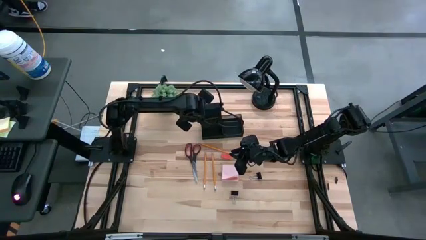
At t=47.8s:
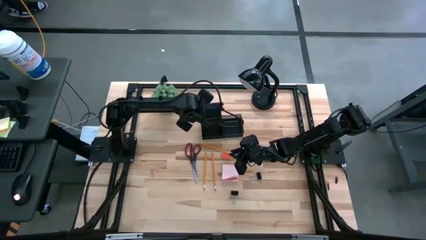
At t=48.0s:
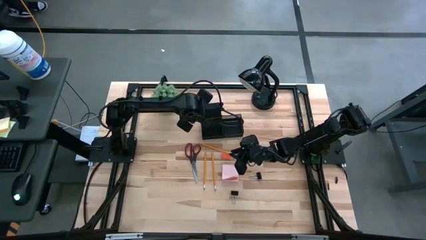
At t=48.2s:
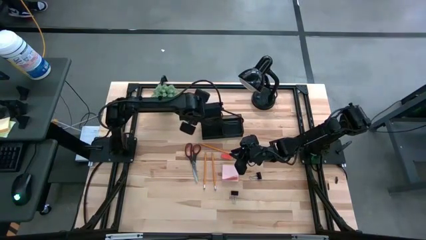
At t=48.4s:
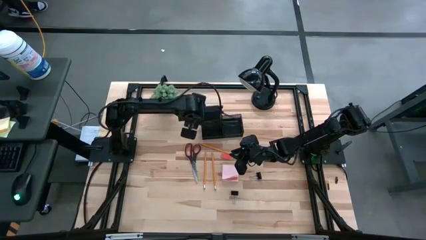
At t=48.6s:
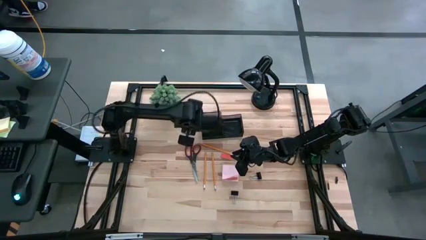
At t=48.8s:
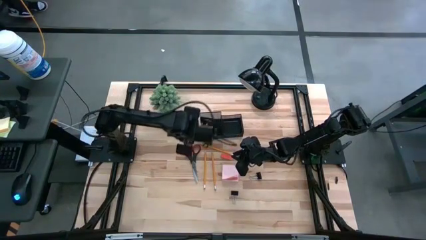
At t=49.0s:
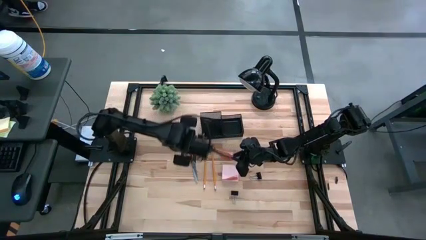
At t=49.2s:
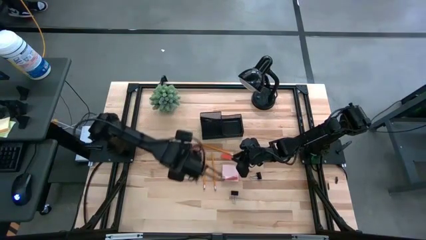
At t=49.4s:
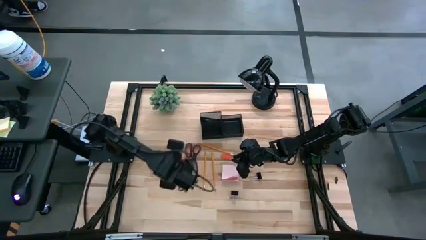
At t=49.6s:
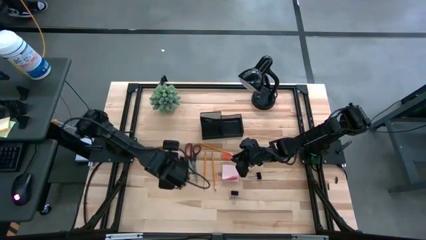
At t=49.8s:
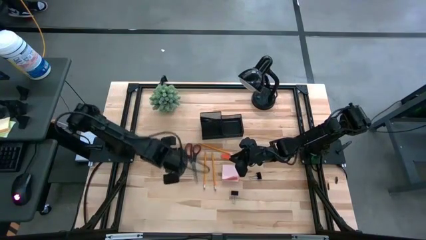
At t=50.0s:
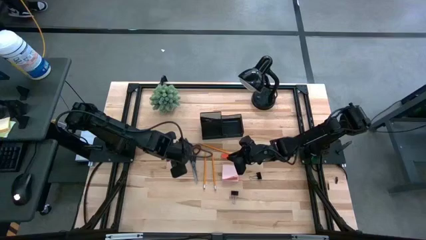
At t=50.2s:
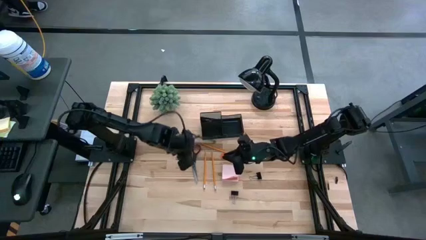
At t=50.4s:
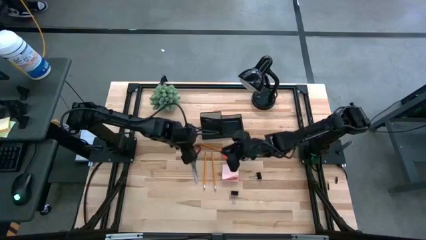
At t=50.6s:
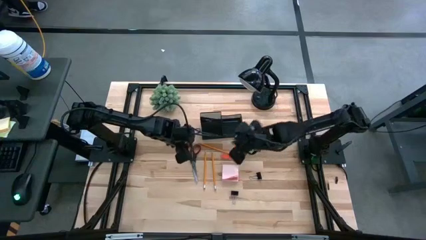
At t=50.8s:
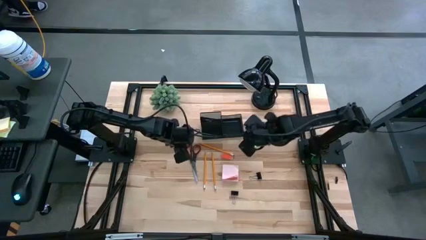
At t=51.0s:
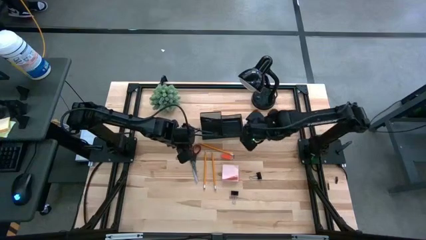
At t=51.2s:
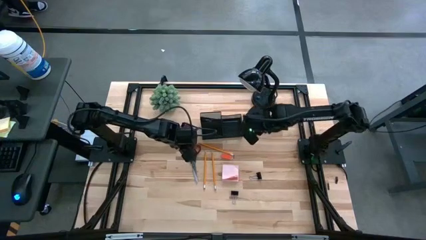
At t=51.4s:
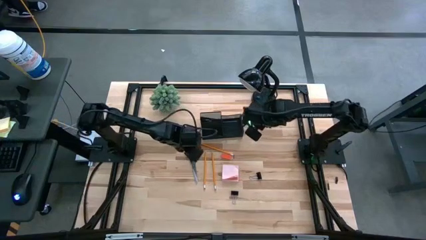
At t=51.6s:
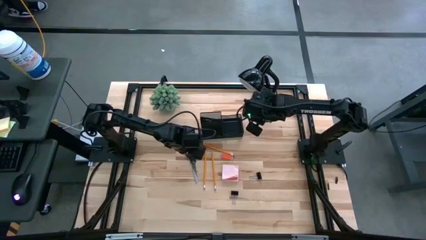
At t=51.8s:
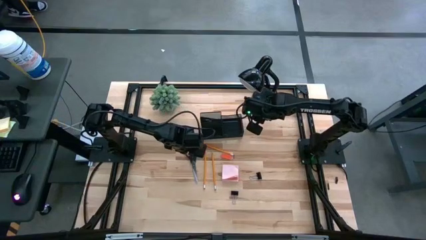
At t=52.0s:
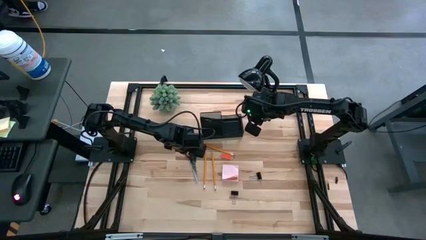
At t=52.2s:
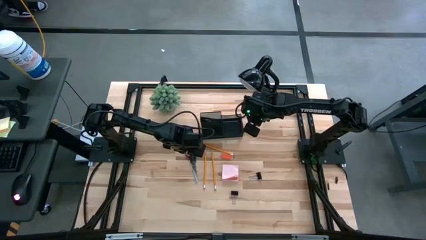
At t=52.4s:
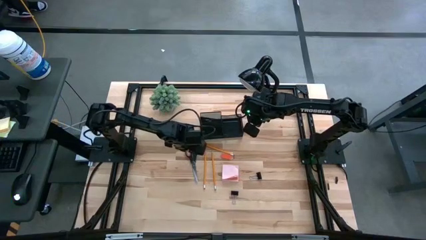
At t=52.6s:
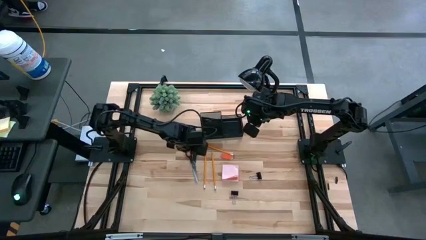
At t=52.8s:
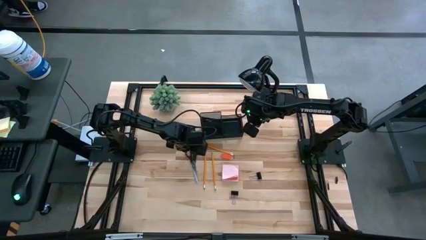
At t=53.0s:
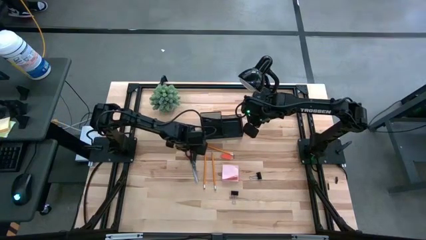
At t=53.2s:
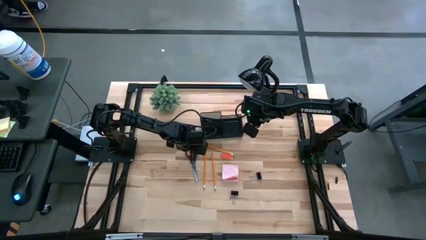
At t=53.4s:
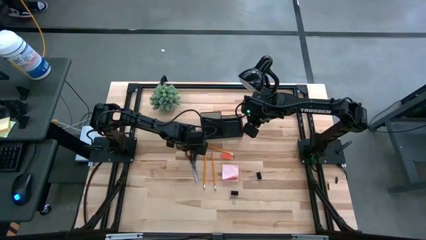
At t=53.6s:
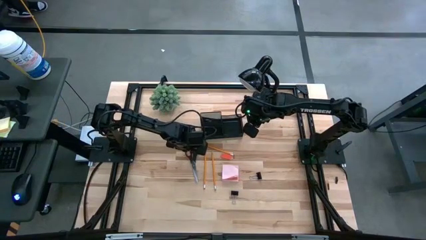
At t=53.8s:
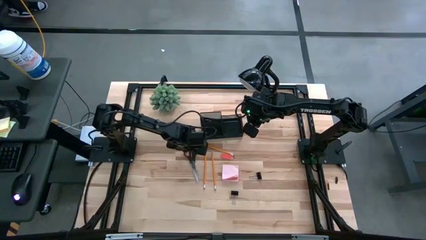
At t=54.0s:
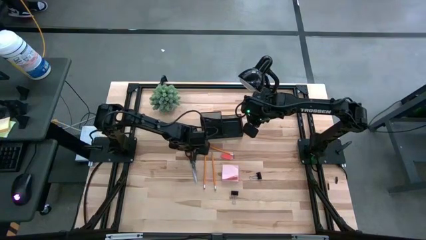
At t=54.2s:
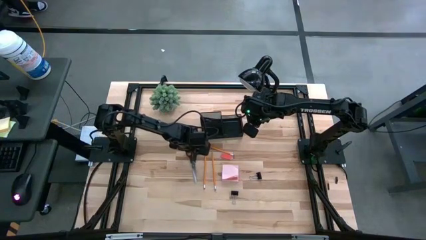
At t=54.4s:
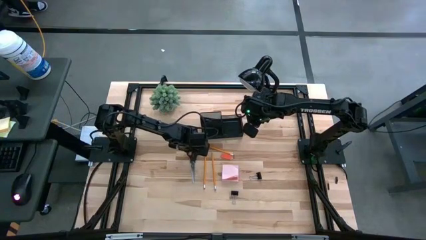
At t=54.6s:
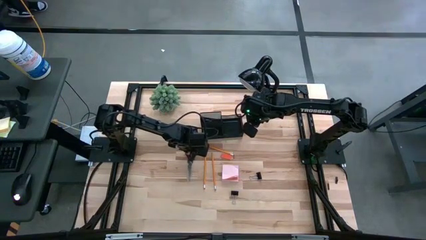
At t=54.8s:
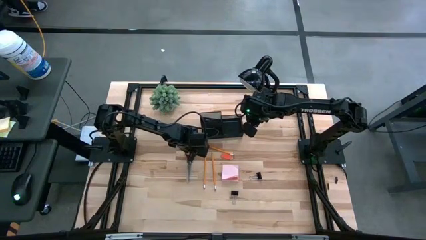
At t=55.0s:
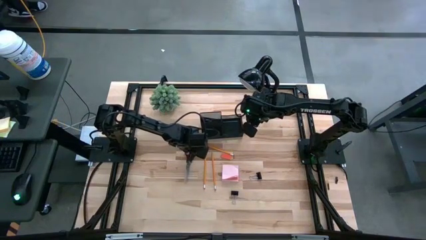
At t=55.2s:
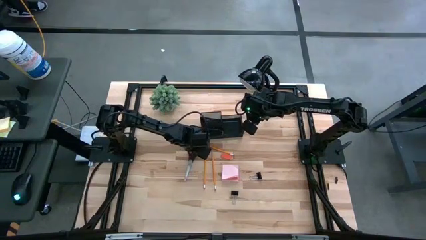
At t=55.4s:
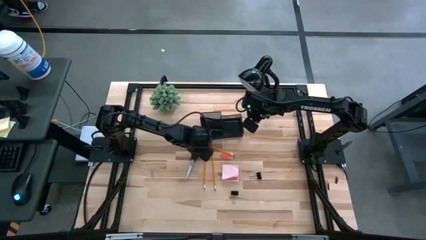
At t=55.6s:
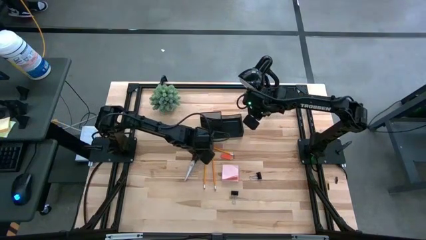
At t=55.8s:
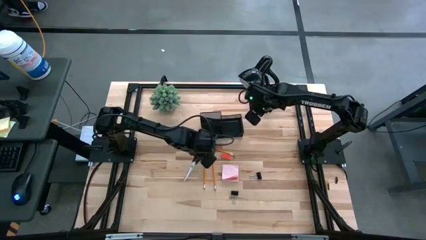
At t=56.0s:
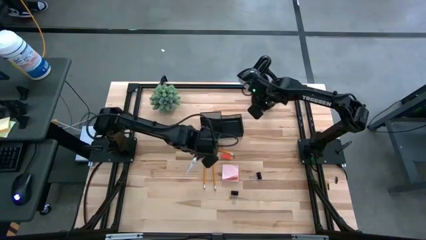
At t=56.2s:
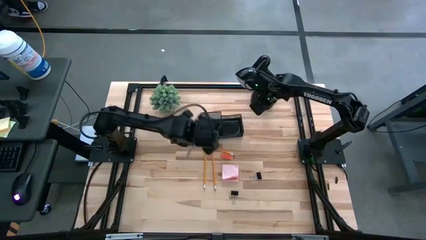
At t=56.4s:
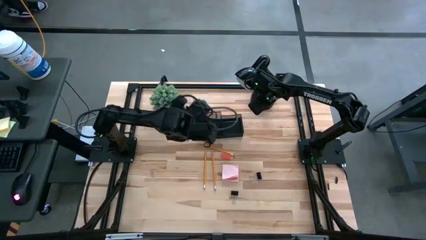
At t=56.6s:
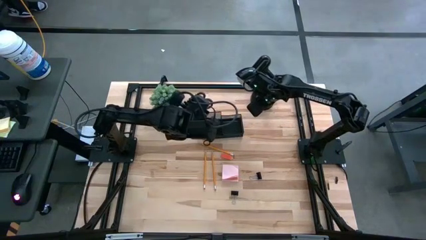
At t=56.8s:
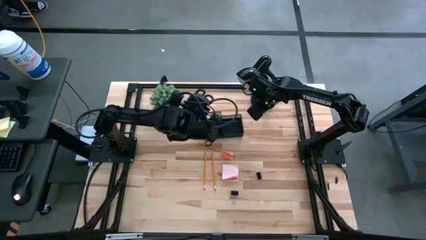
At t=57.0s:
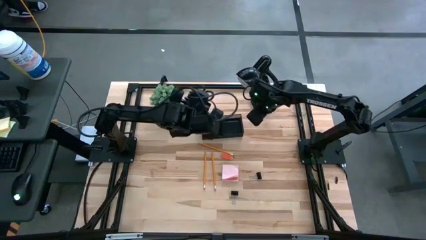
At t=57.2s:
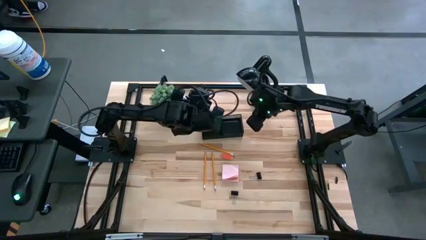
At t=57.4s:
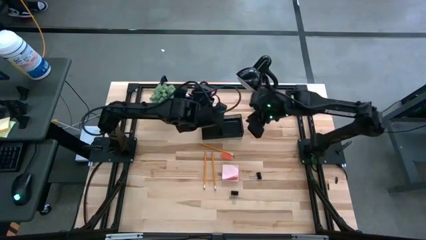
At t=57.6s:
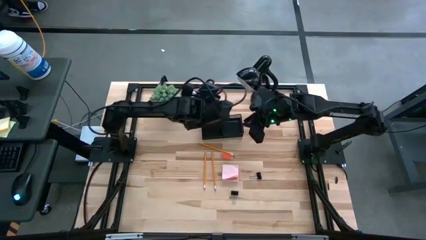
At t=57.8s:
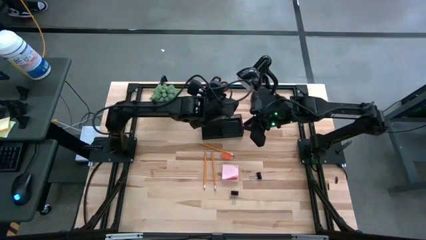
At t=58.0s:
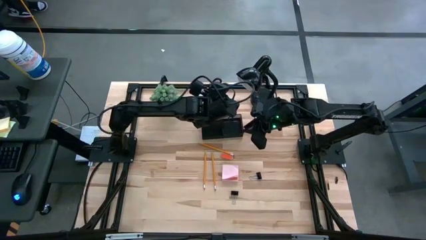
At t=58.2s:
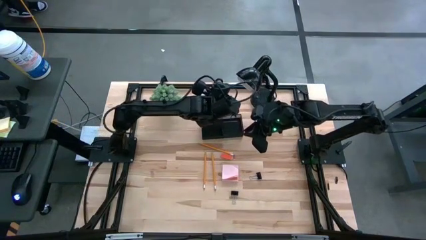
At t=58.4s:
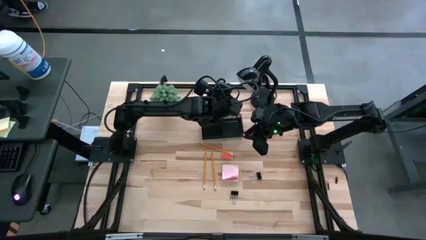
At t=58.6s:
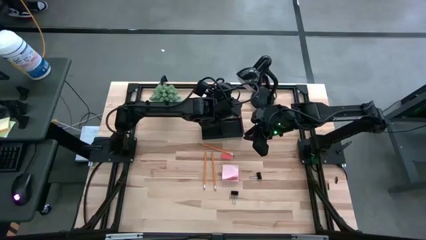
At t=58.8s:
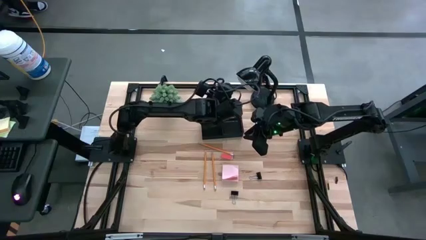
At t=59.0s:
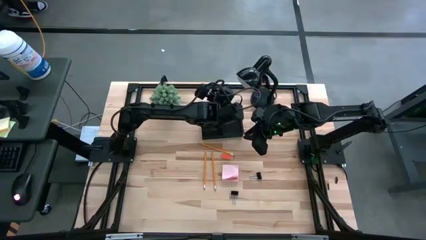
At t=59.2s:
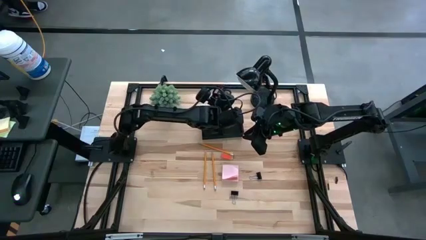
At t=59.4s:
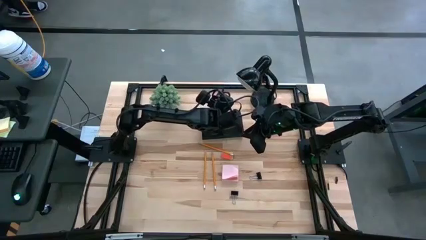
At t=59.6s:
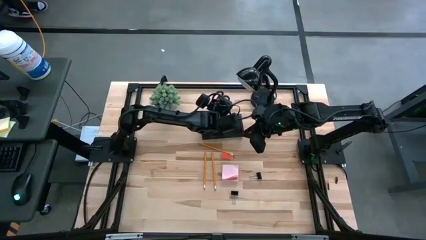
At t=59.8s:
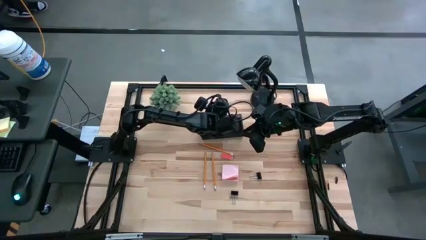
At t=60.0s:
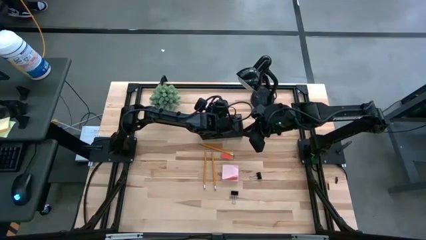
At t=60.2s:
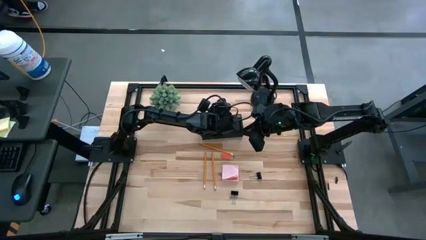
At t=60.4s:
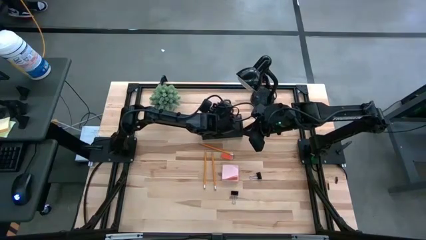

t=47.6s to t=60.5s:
Task: Pick and place office supplies into organizer
Put the scissors into the desk organizer
